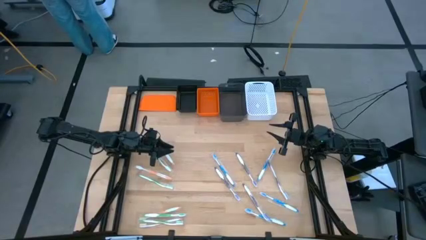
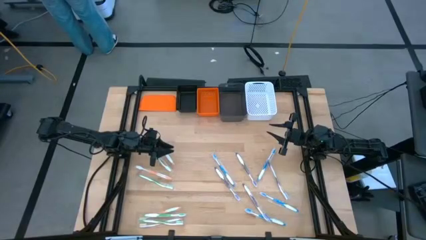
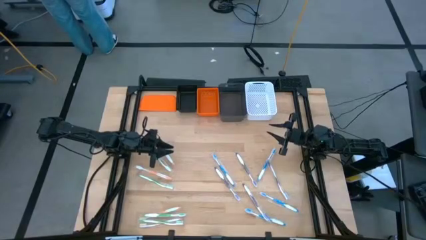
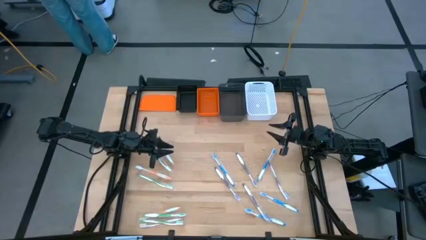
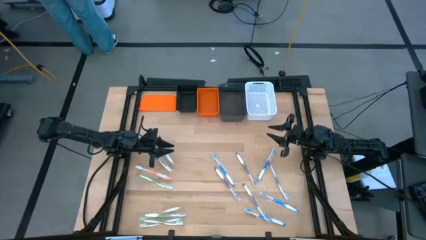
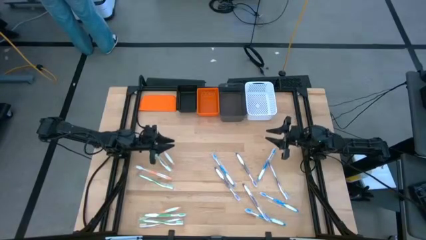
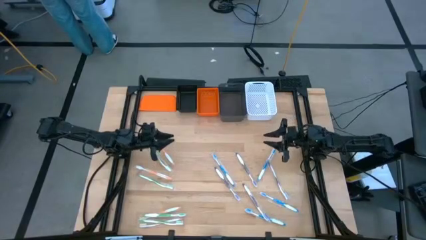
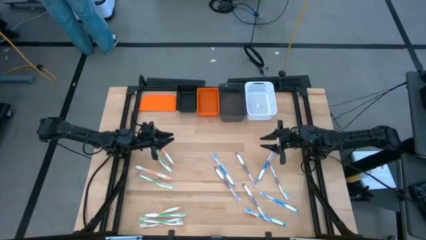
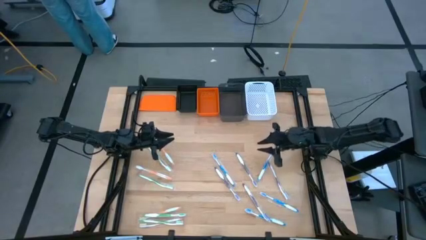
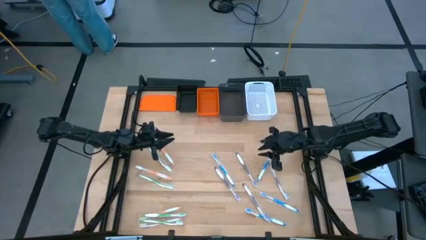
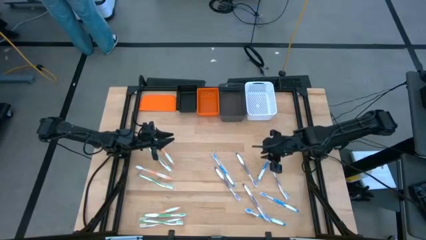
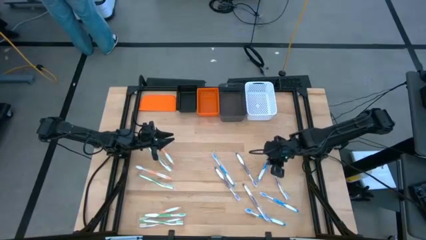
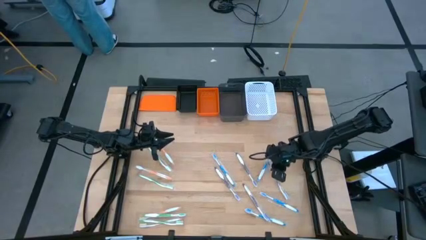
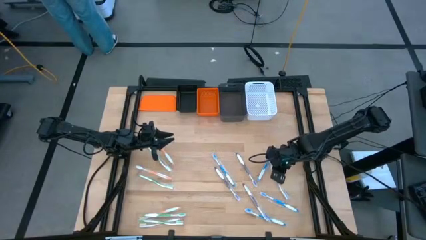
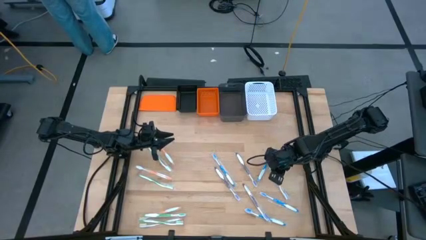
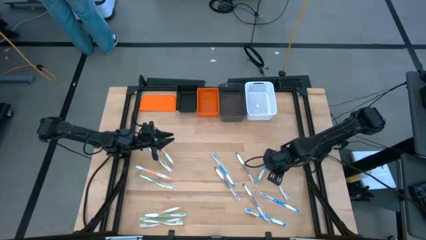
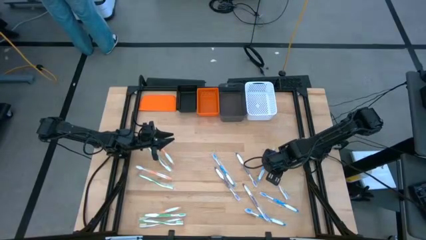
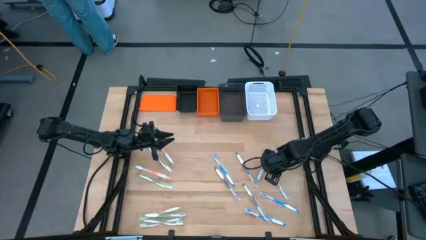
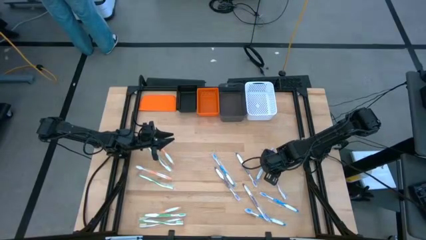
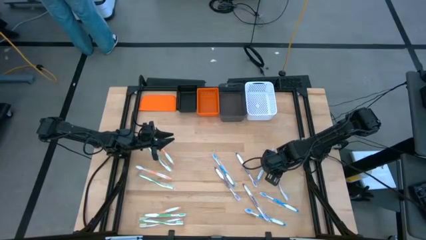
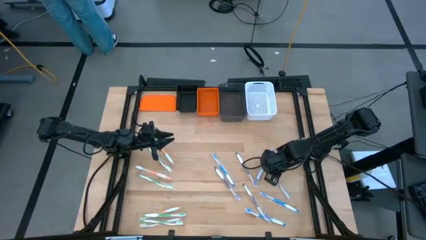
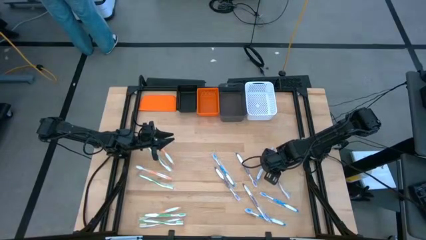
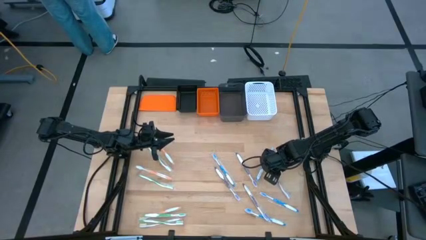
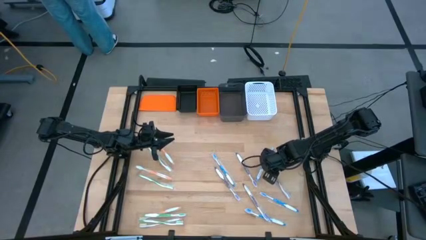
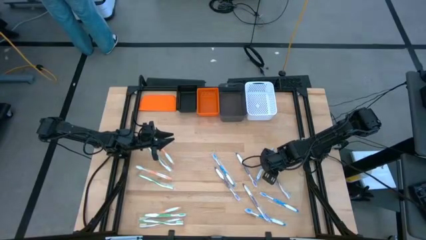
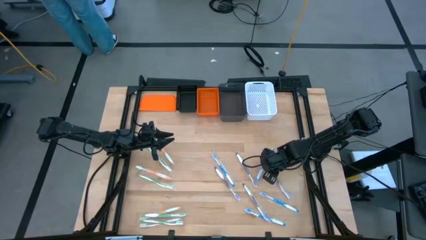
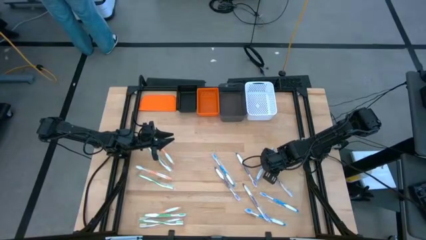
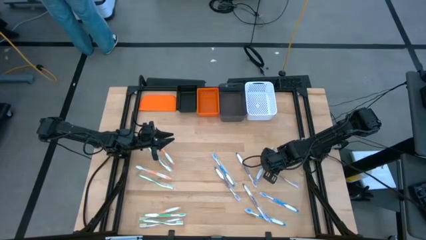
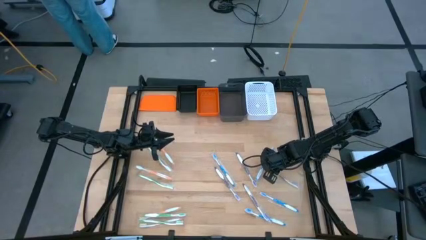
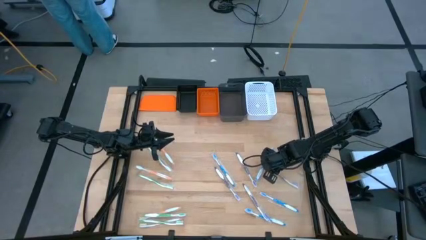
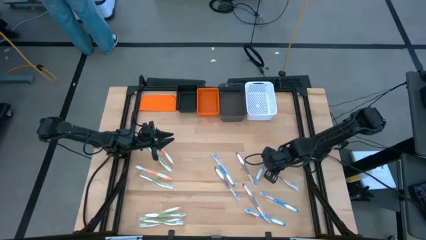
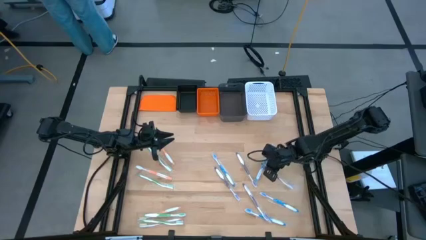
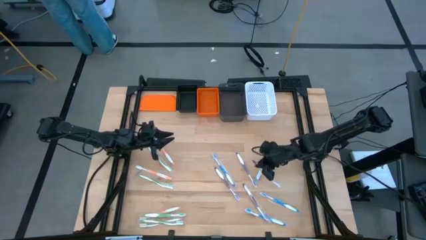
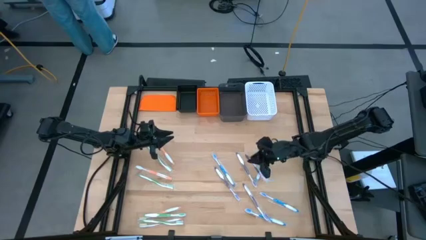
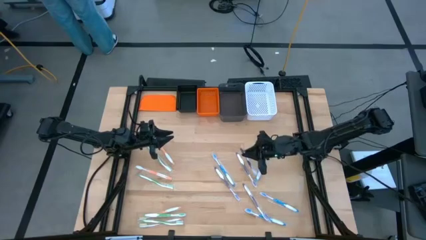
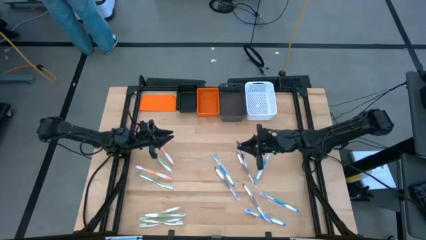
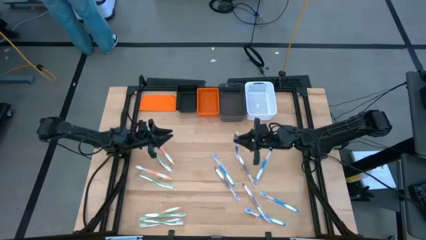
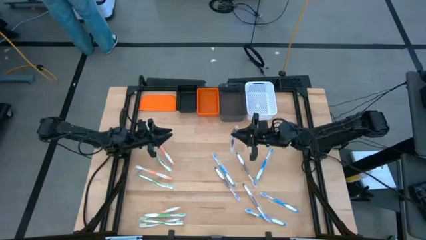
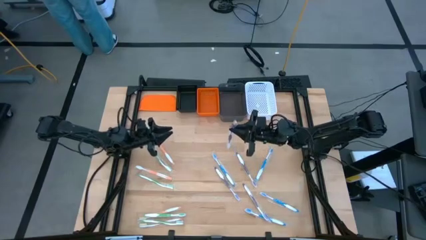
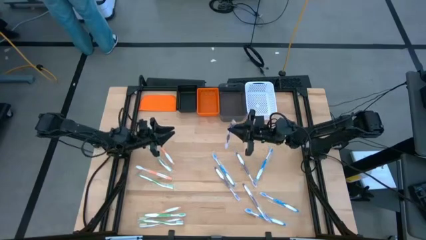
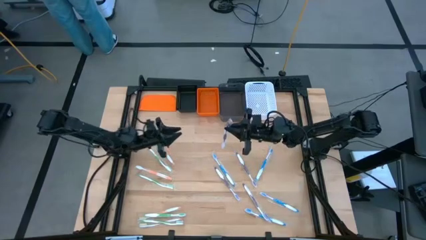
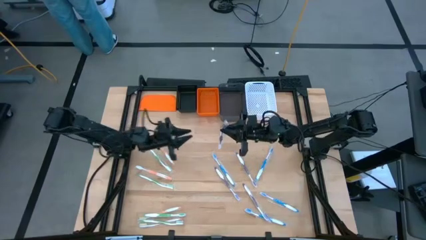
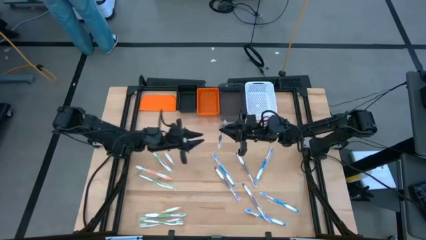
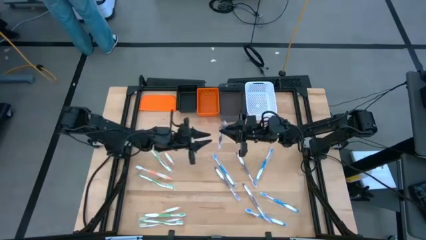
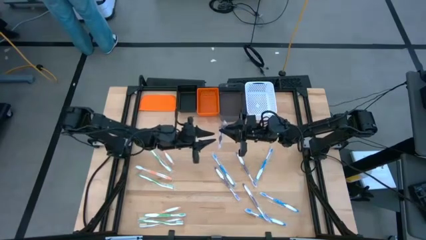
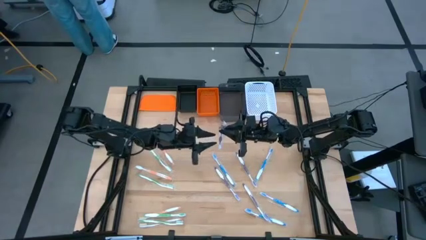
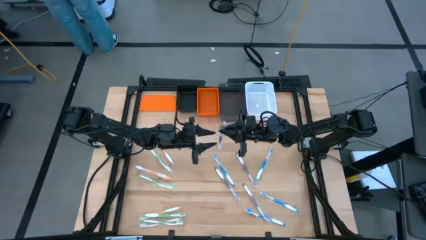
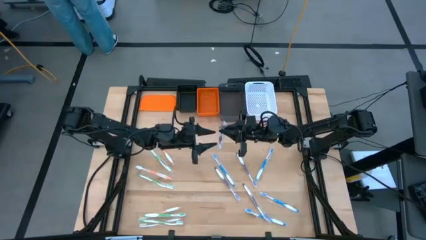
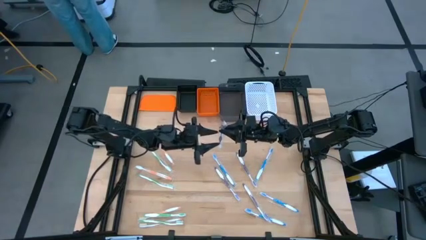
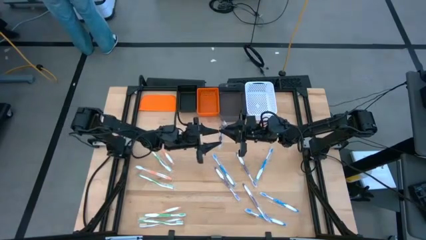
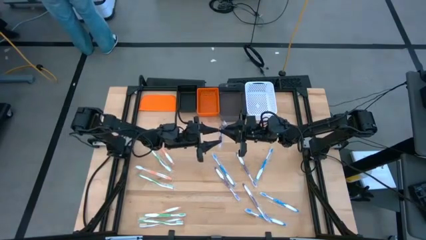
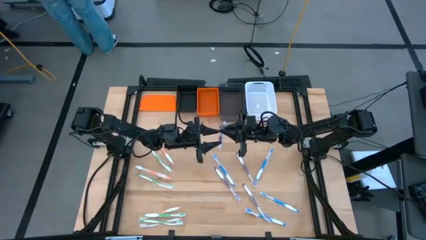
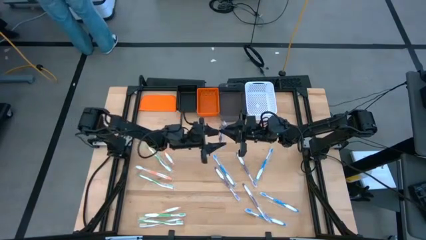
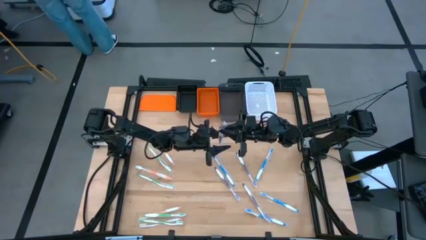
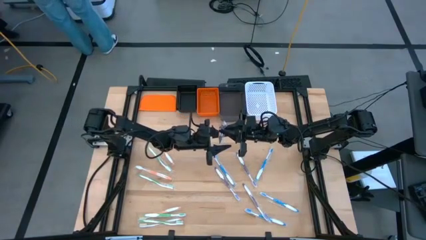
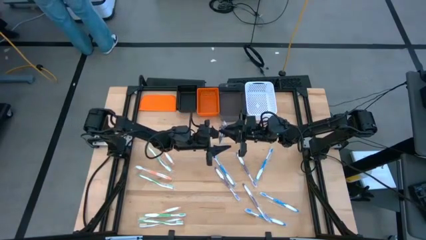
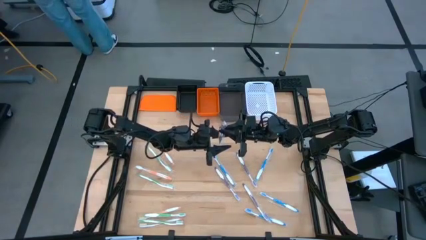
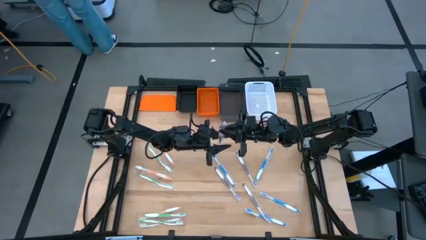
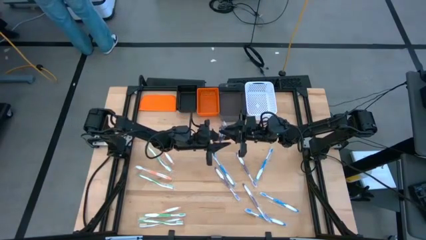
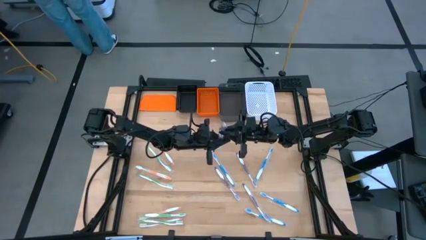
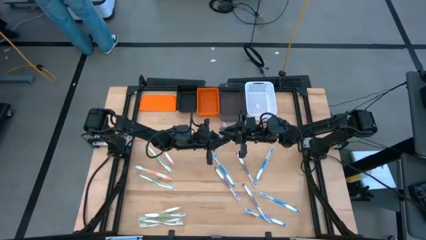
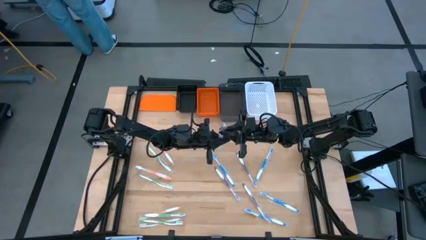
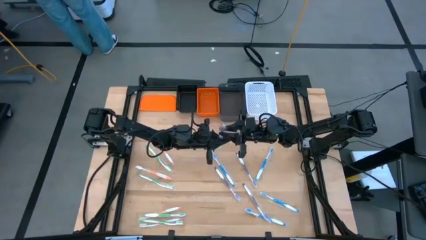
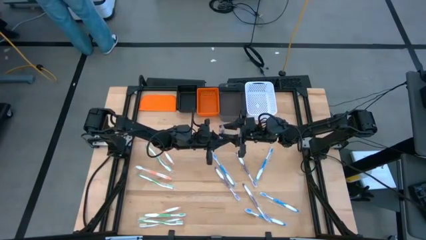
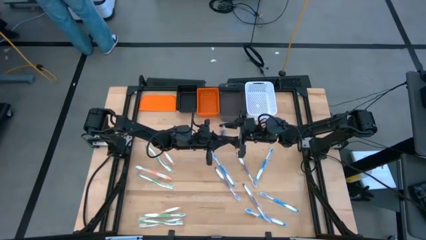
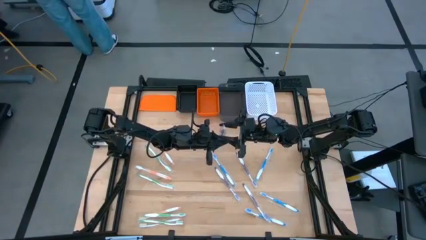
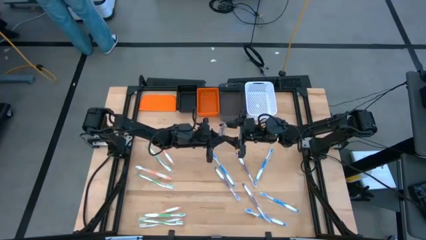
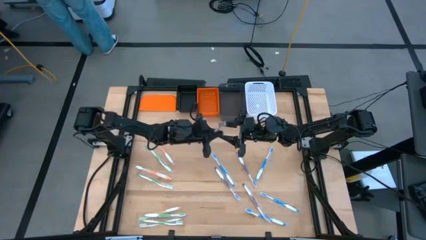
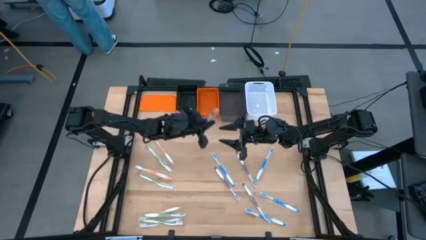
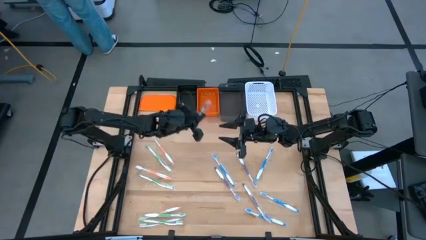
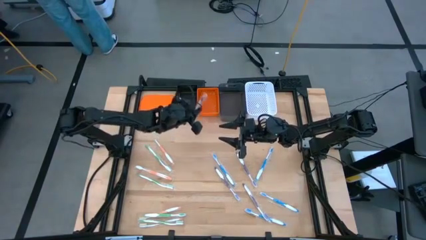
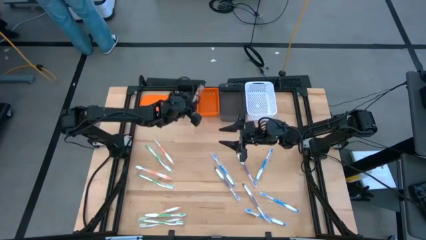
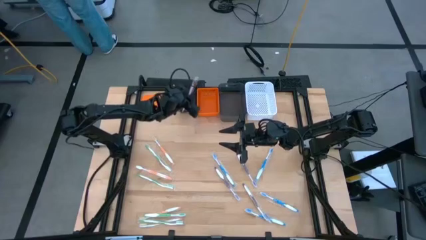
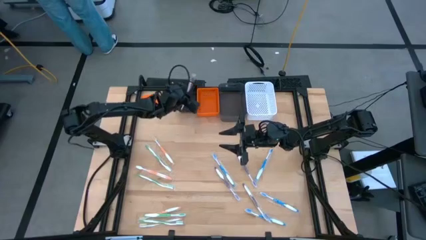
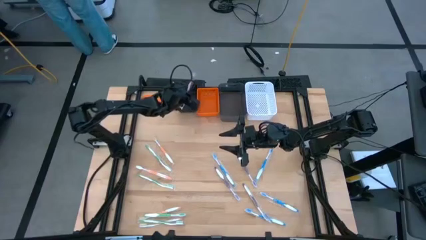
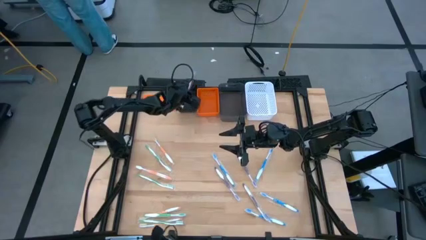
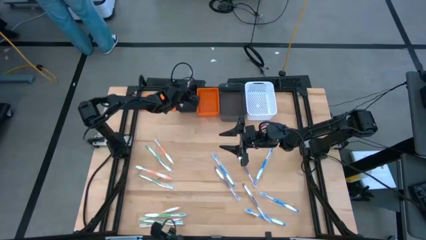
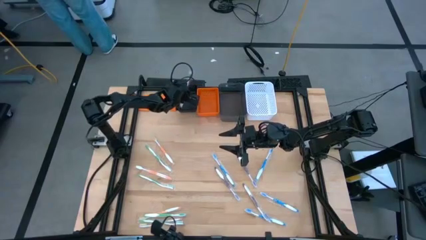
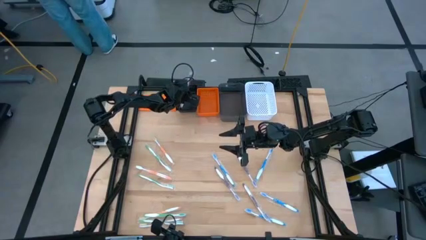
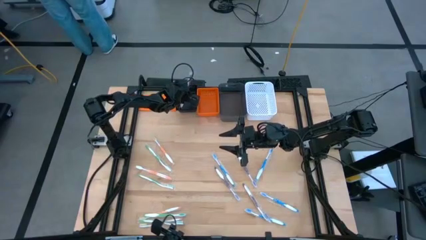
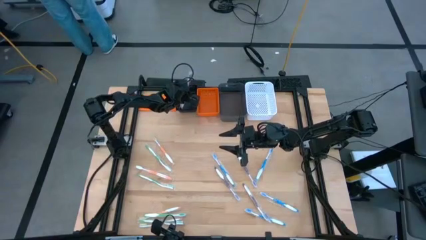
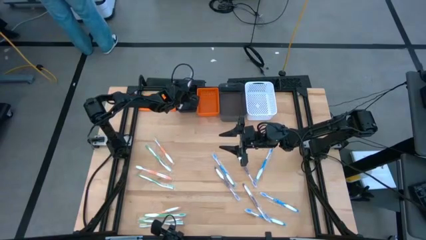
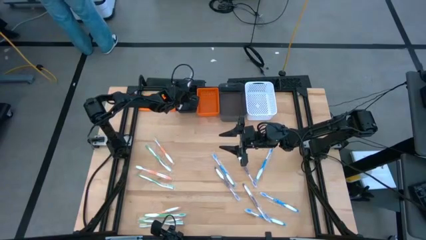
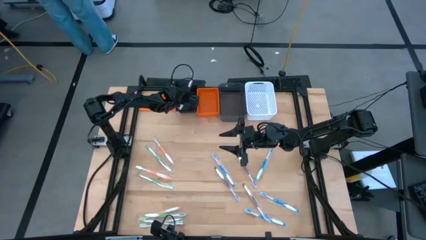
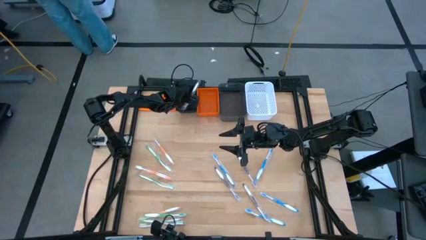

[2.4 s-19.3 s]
Task: Pick & Place Toothbrushes
Put the purple toothbrush into the black bin
